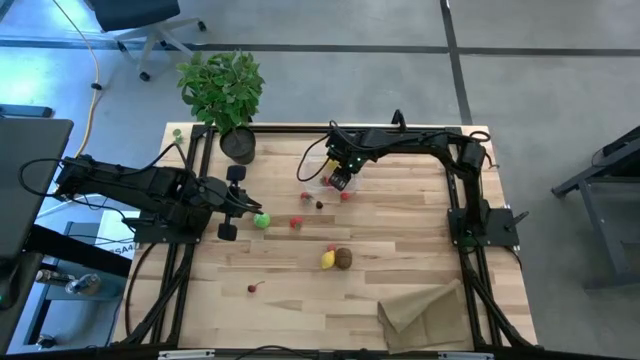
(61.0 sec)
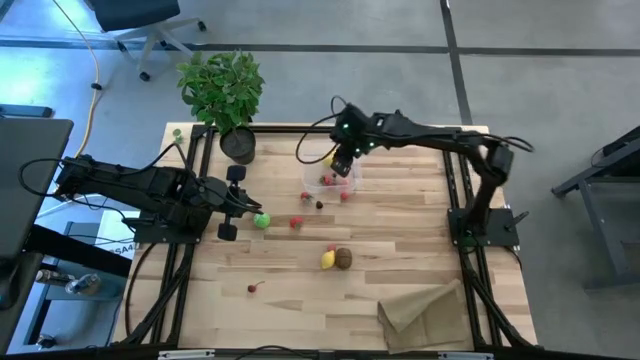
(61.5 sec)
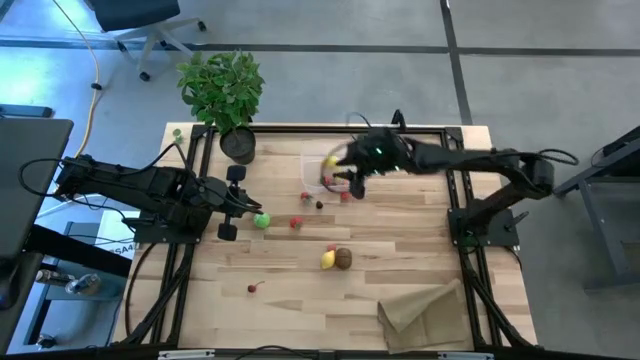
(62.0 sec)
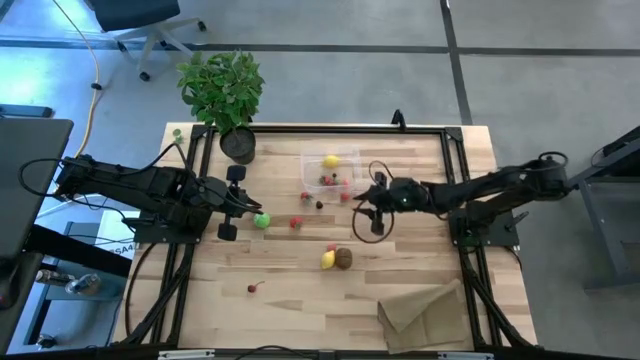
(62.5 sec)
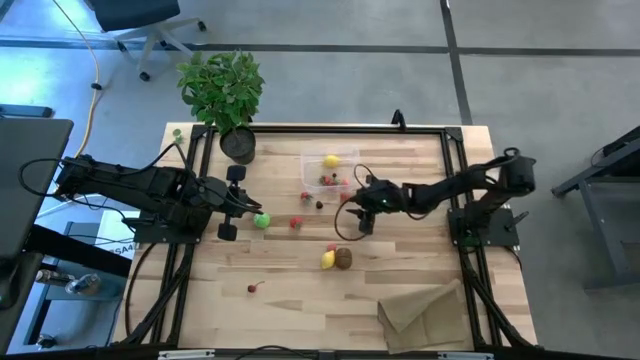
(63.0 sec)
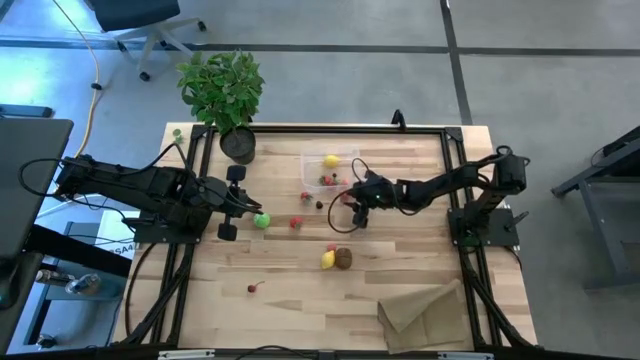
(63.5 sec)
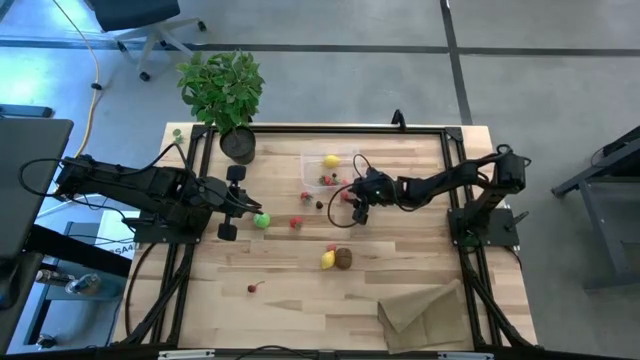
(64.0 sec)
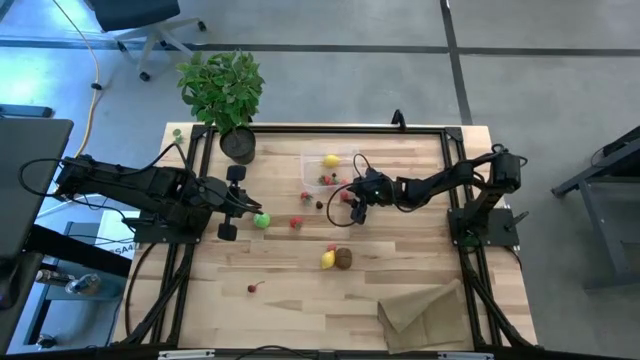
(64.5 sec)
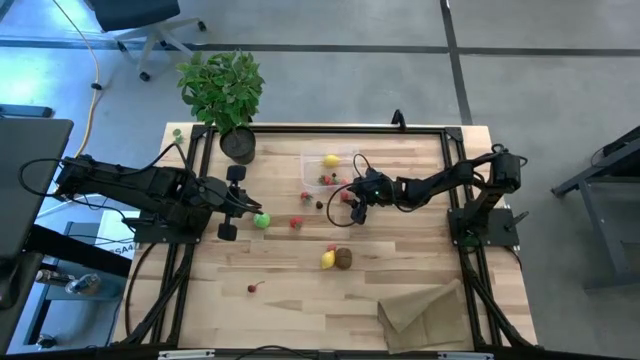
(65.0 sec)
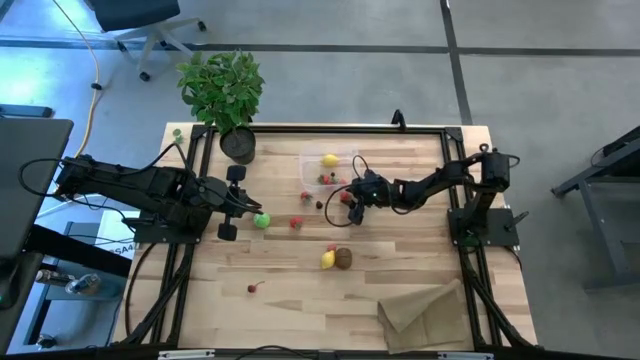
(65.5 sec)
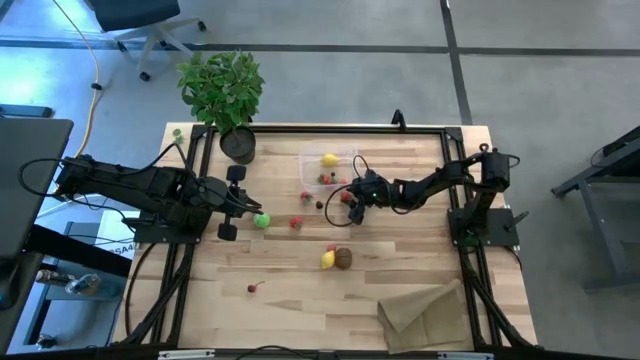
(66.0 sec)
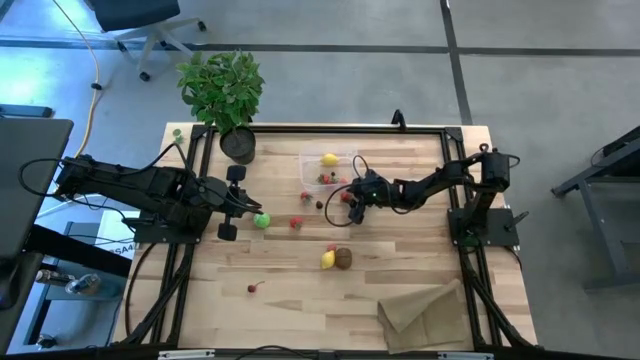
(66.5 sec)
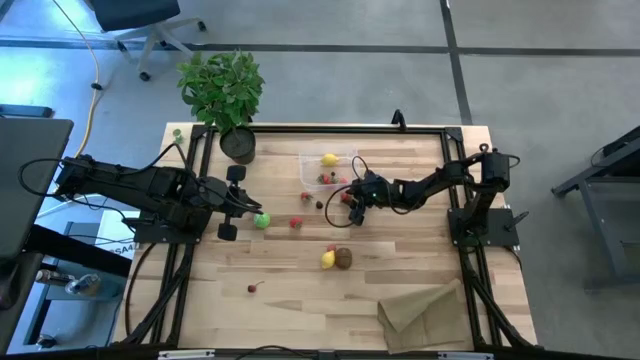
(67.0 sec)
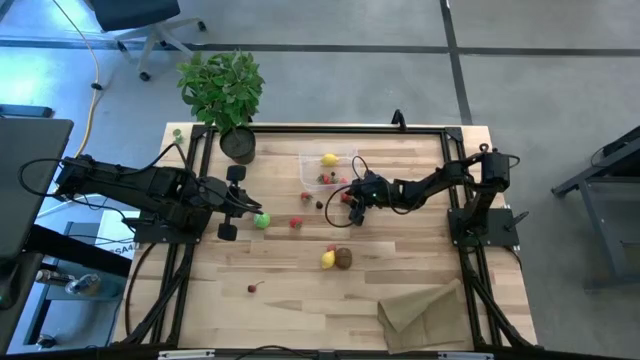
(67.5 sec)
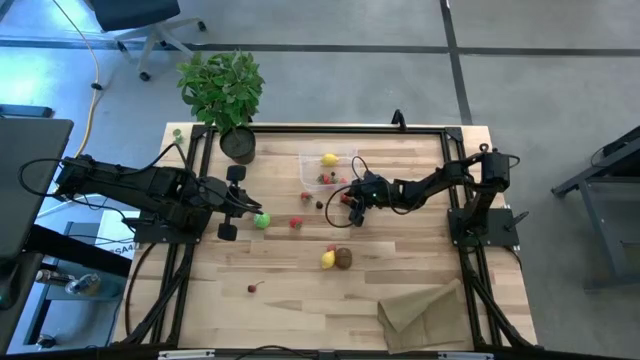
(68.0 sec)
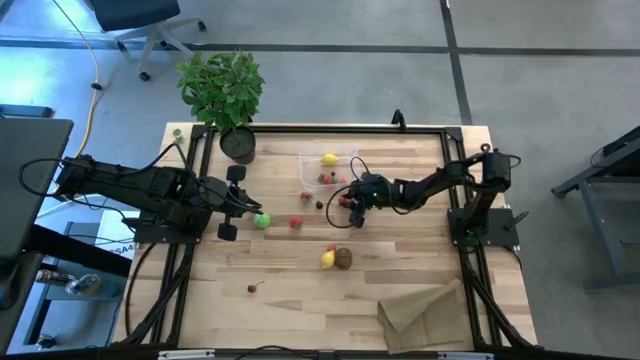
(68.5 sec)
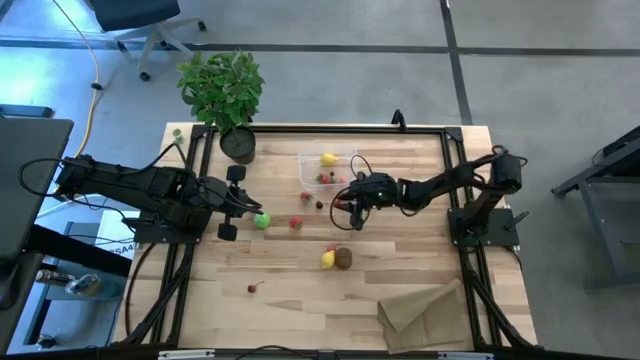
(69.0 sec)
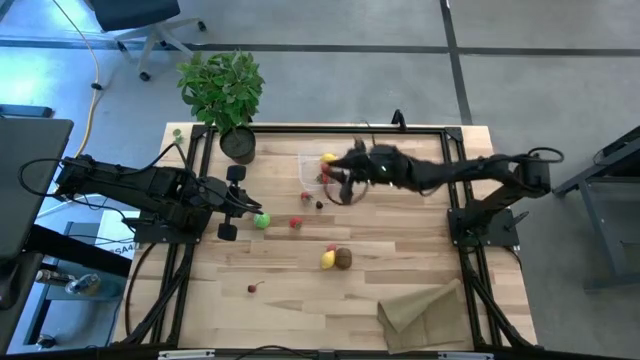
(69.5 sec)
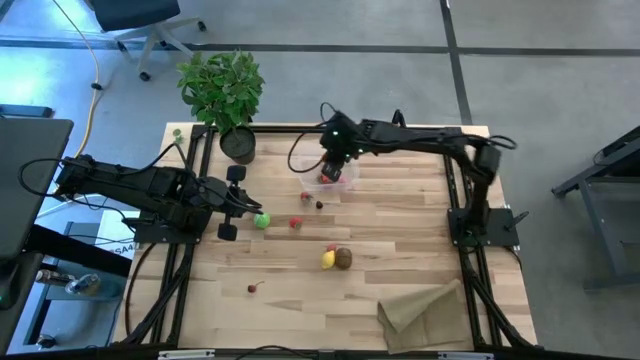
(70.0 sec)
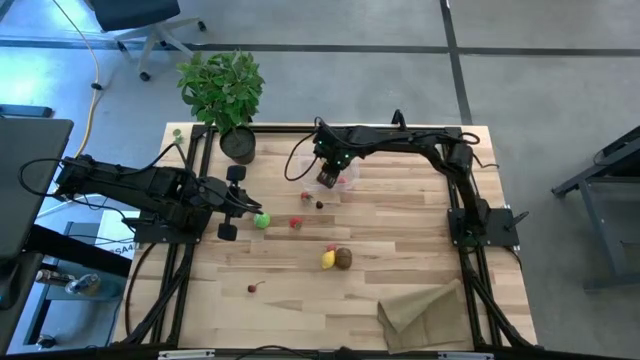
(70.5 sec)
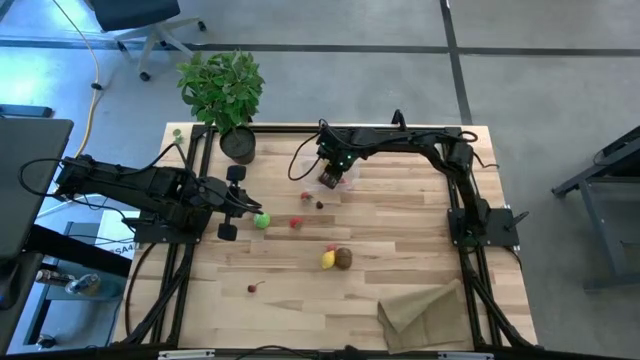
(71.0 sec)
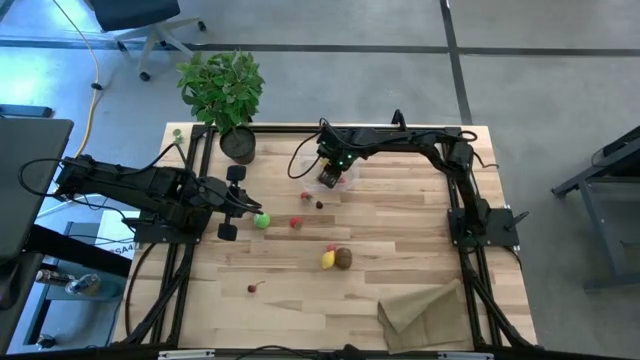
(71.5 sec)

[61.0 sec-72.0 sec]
Task: Pick and placing Produce into tupperware
Put the top right cherry into the transparent bin

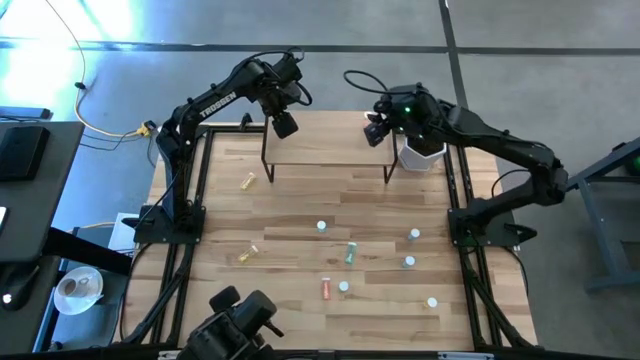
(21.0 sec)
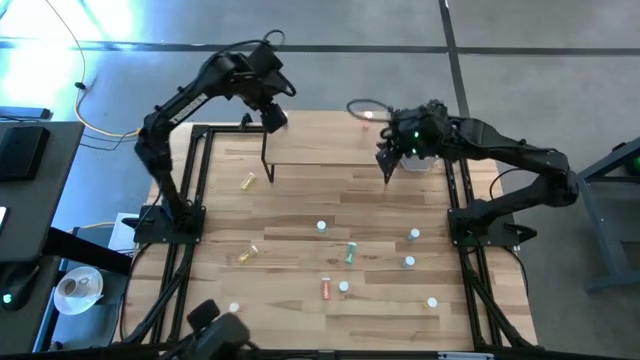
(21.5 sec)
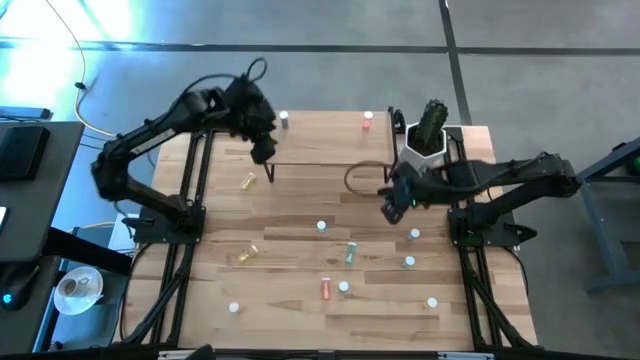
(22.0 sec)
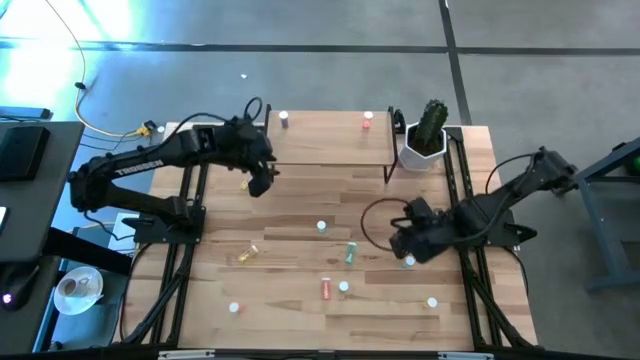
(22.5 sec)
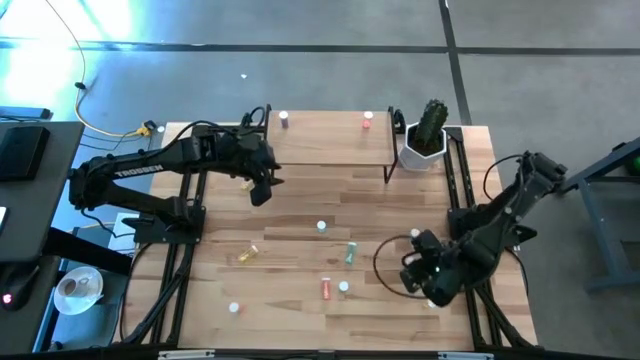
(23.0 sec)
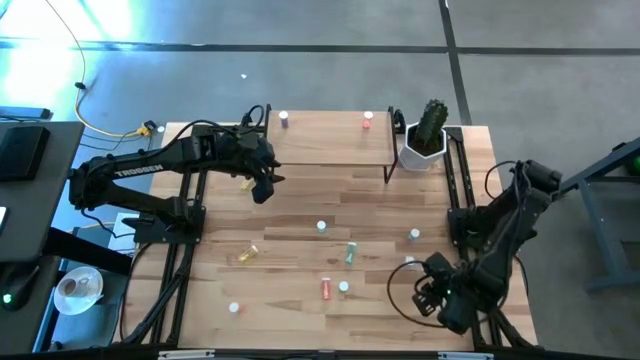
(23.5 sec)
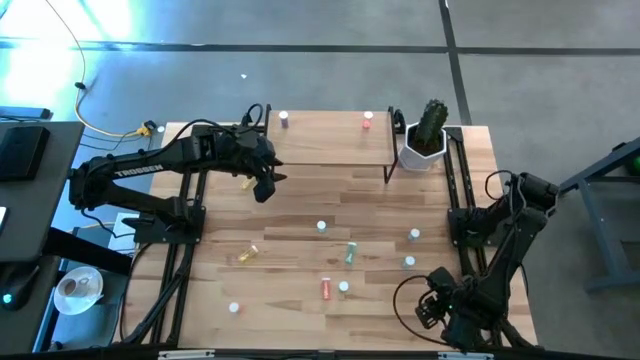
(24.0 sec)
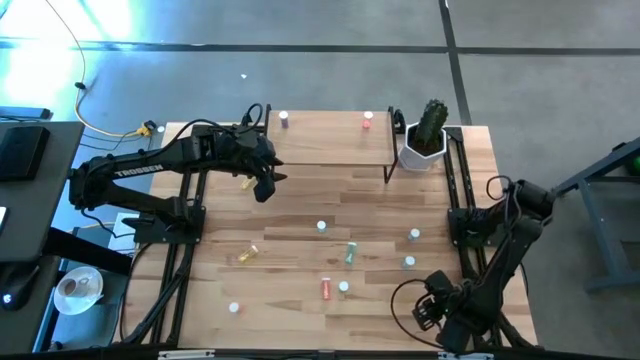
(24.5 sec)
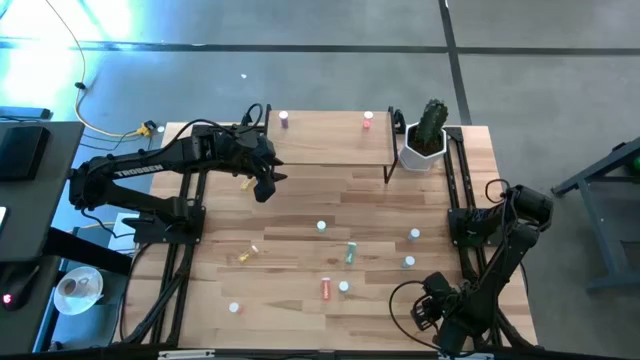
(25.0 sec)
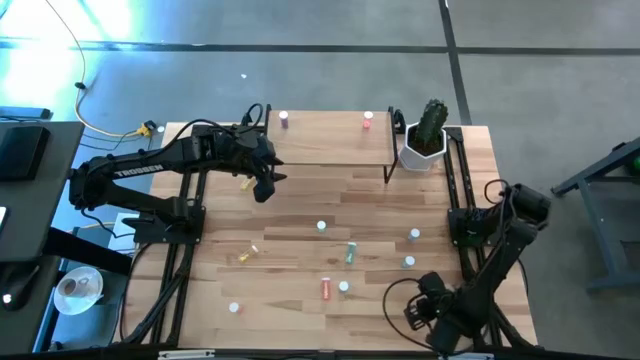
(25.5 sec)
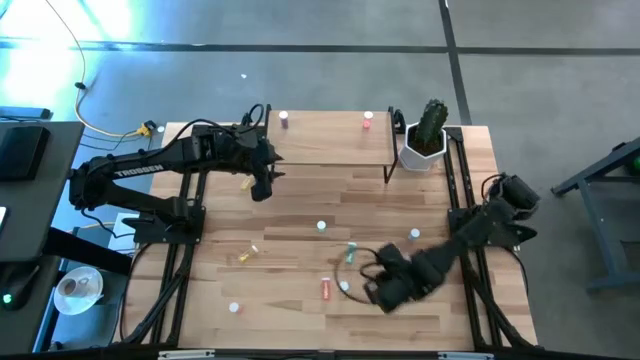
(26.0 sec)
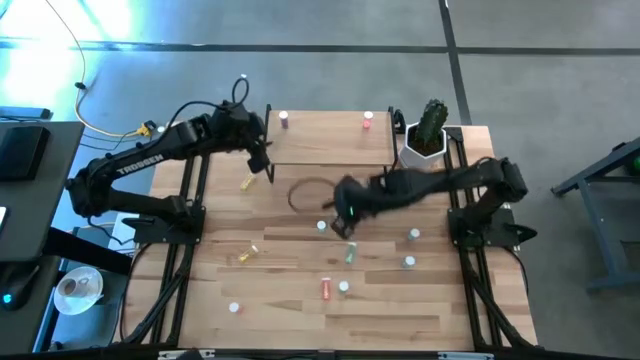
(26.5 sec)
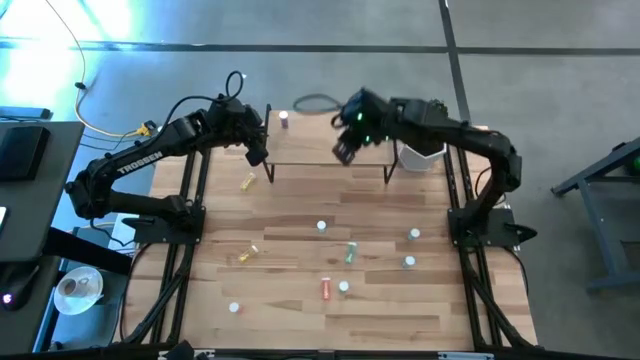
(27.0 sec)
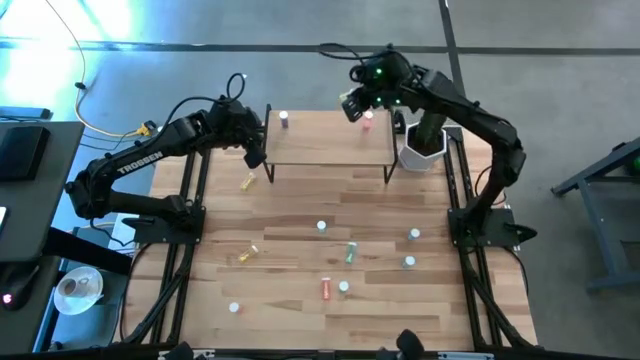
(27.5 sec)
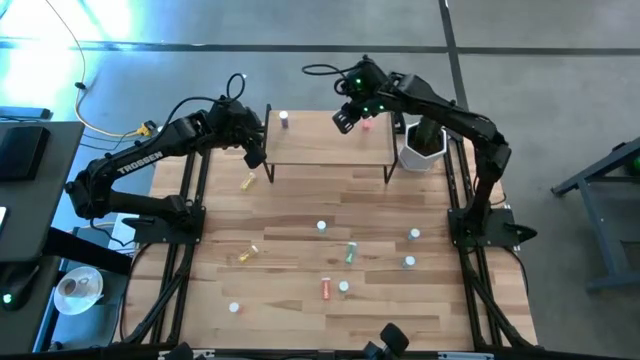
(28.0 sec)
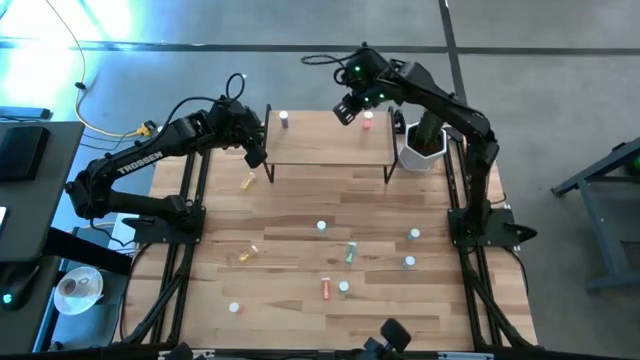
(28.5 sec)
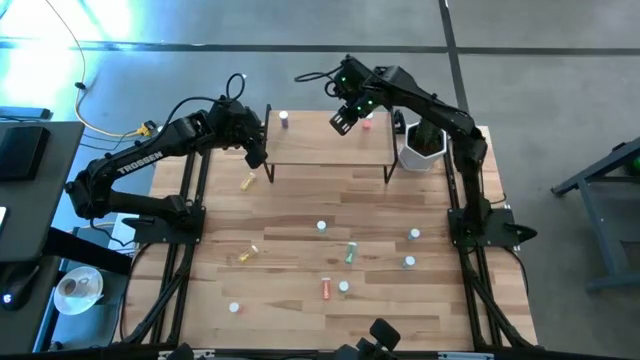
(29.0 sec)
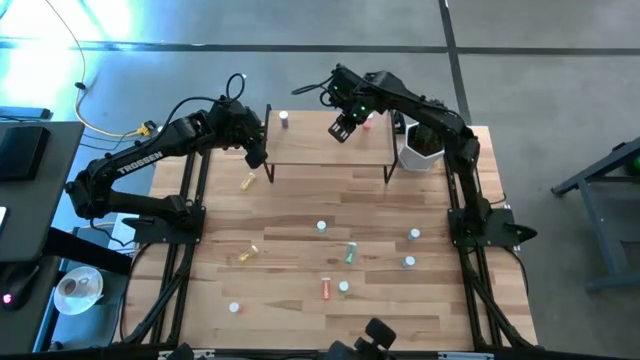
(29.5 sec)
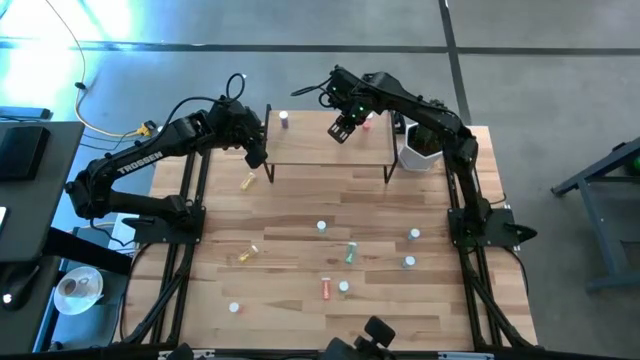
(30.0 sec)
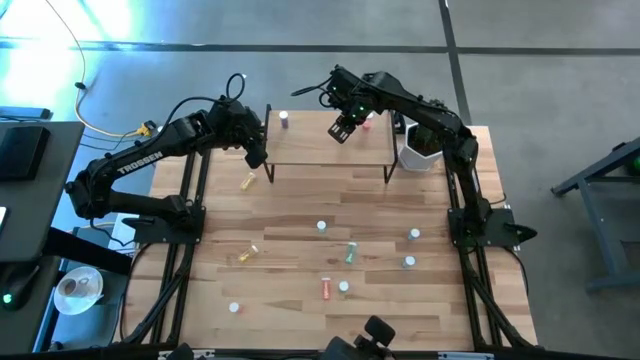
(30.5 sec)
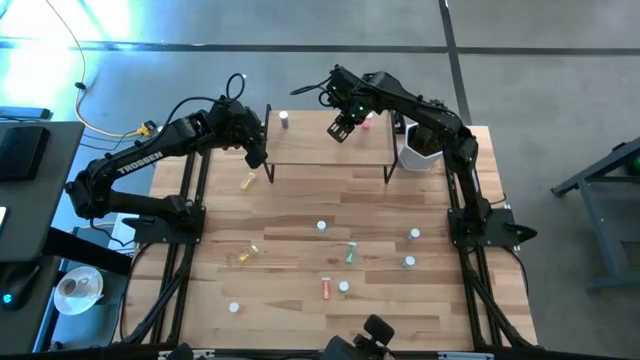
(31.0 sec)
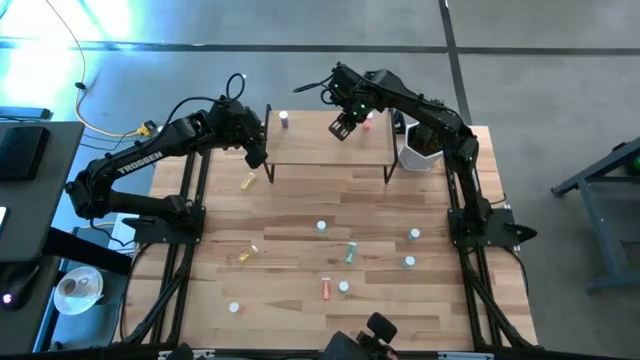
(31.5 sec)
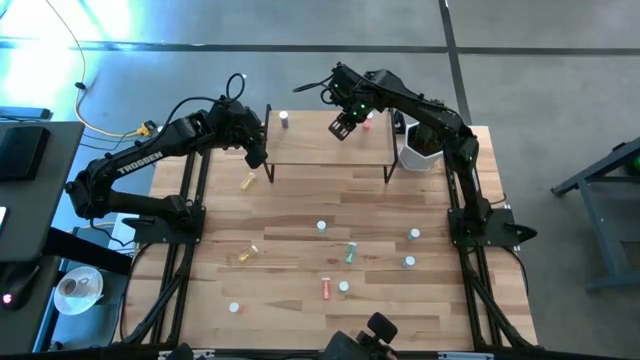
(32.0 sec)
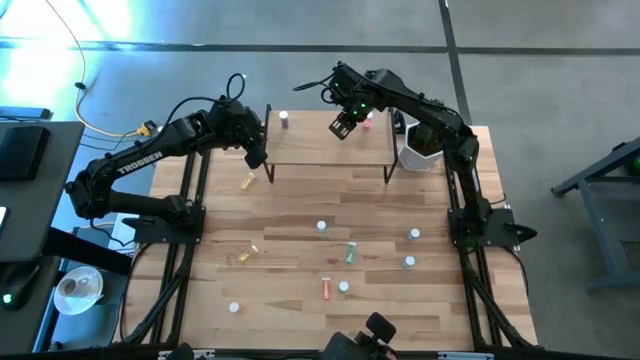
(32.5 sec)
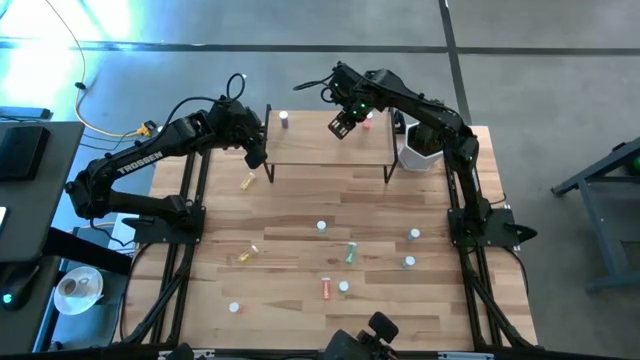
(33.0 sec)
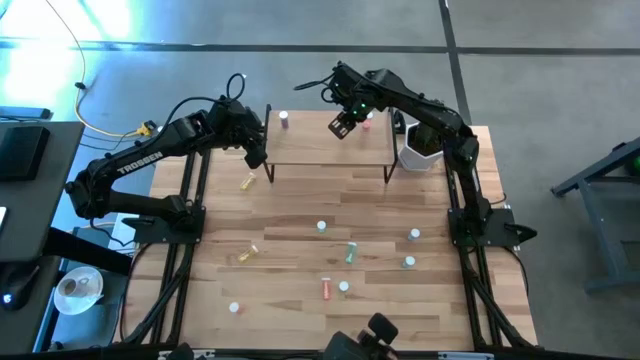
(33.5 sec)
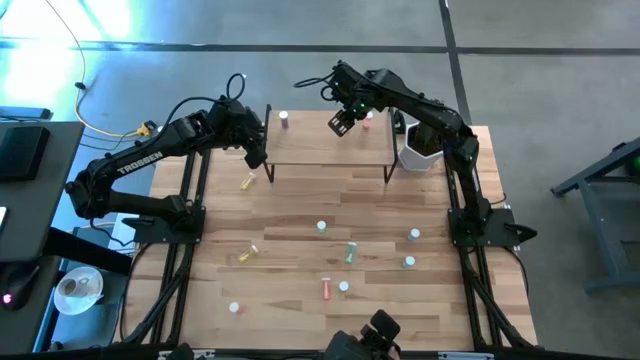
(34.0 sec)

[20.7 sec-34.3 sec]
Task: Pick and place medicine bottles onto shelf by color
Put the yellow pill bottle on the shelf
